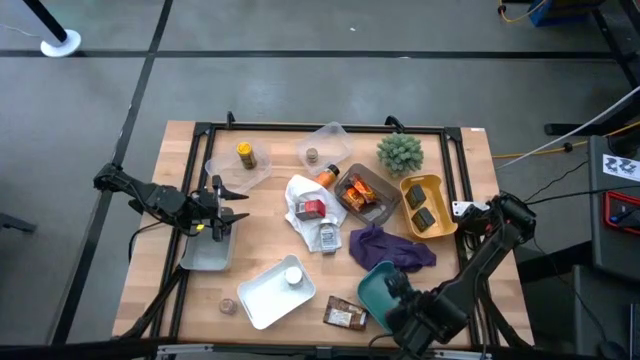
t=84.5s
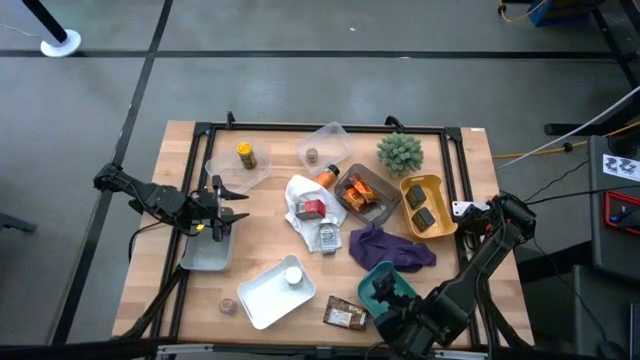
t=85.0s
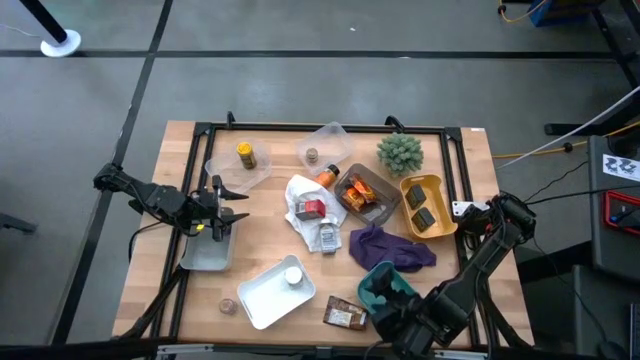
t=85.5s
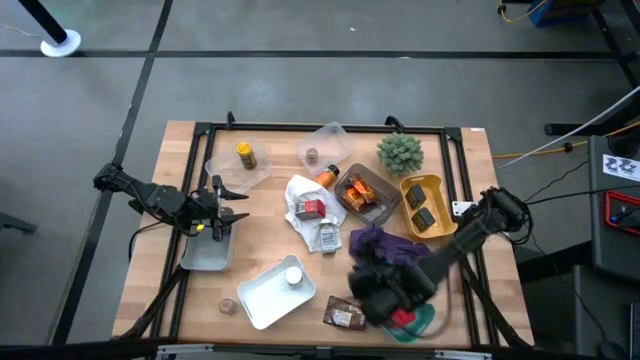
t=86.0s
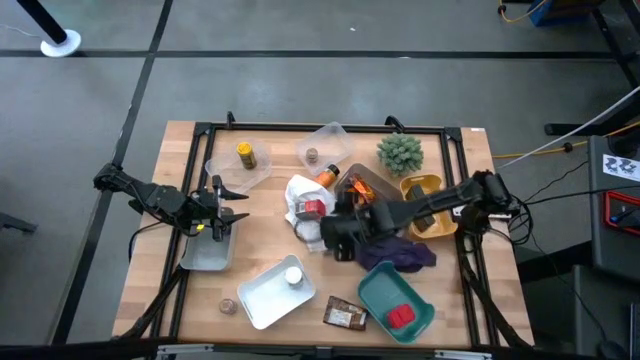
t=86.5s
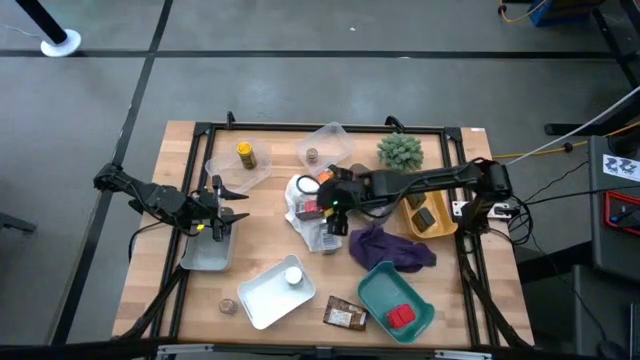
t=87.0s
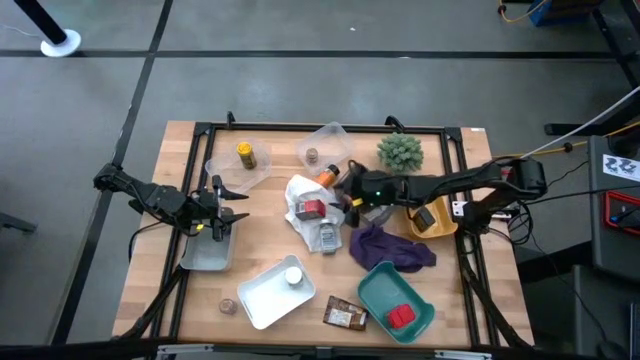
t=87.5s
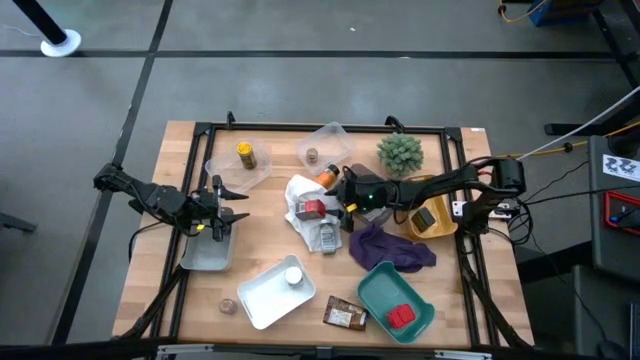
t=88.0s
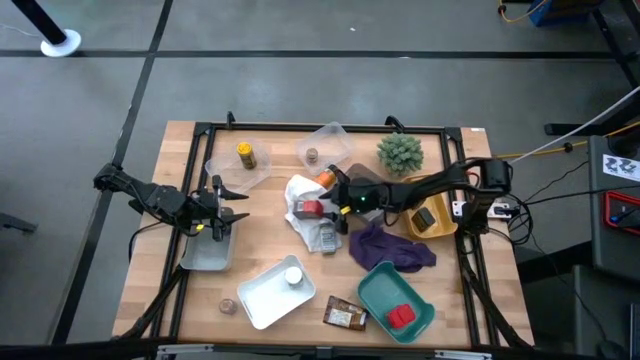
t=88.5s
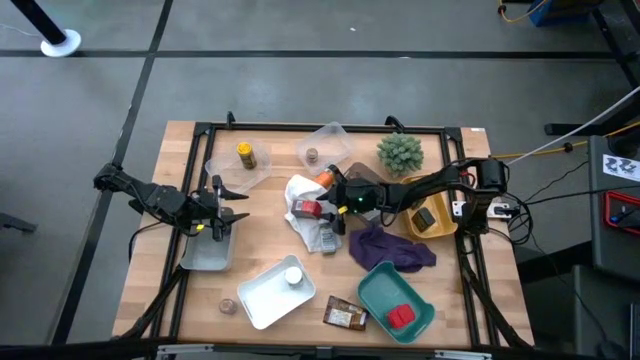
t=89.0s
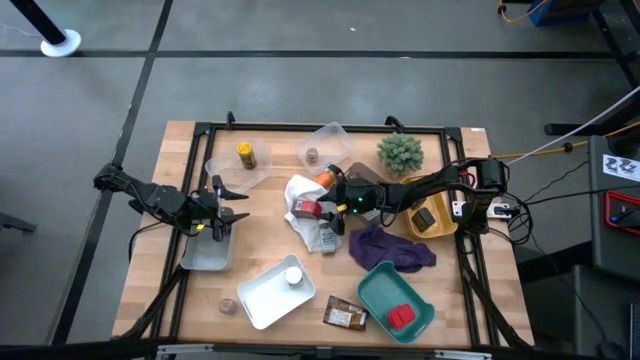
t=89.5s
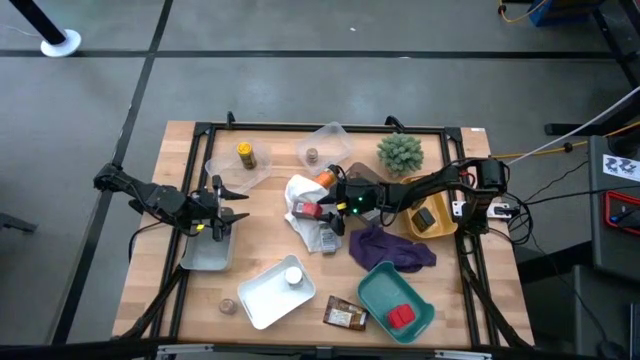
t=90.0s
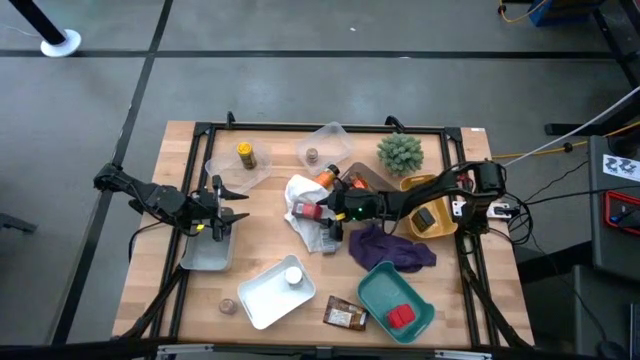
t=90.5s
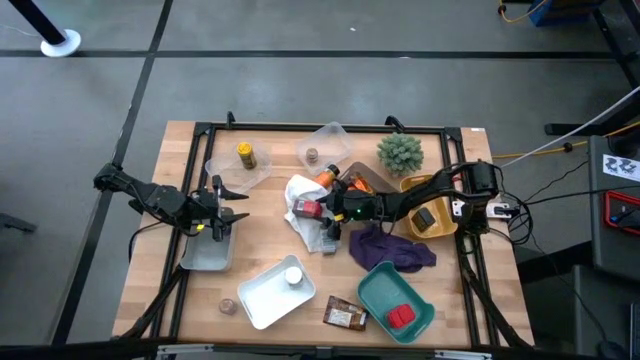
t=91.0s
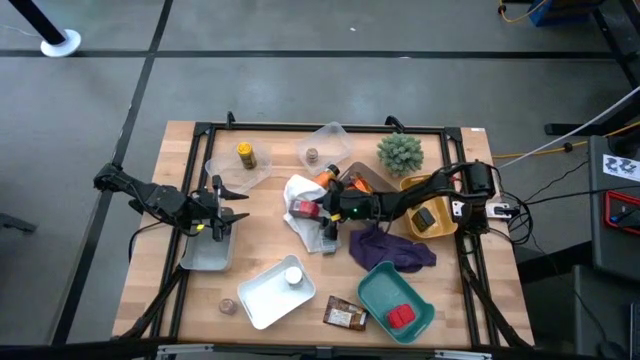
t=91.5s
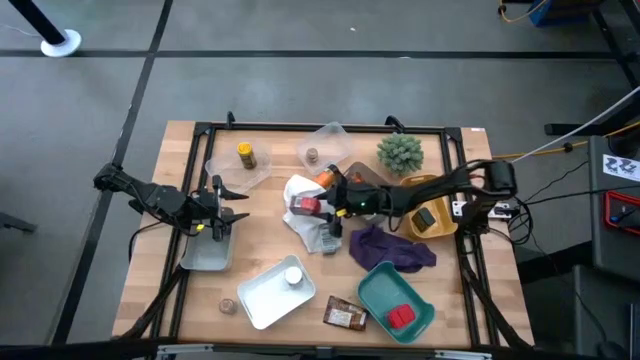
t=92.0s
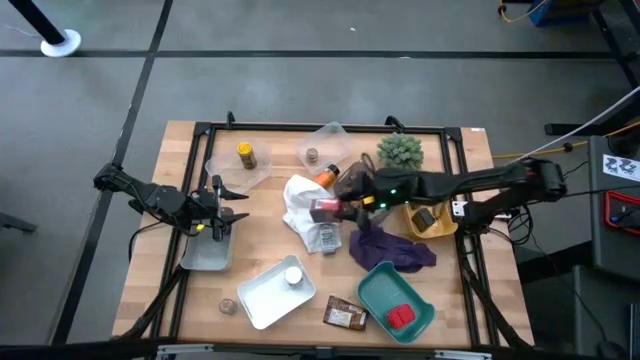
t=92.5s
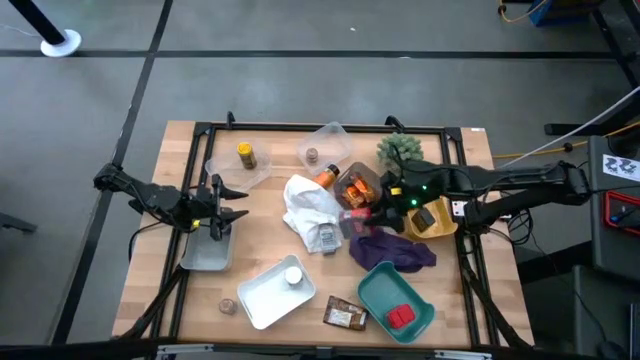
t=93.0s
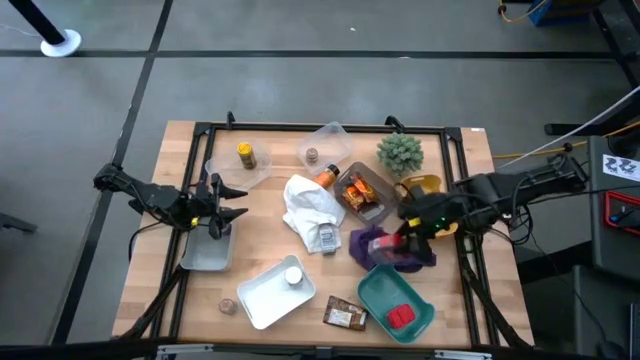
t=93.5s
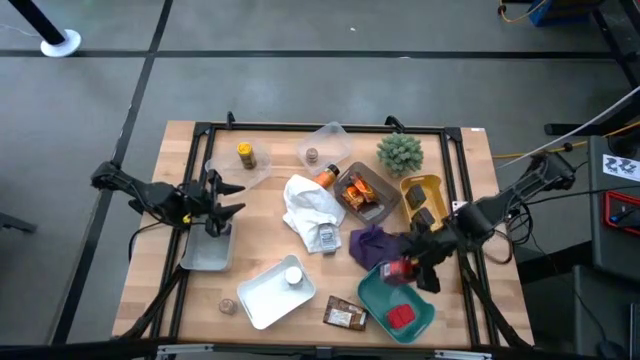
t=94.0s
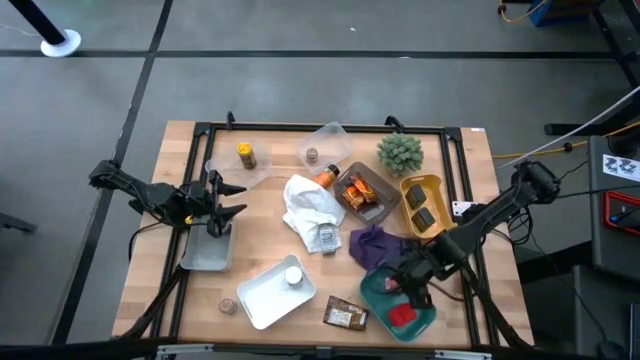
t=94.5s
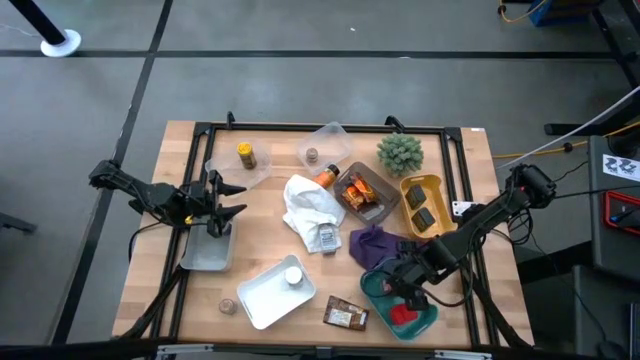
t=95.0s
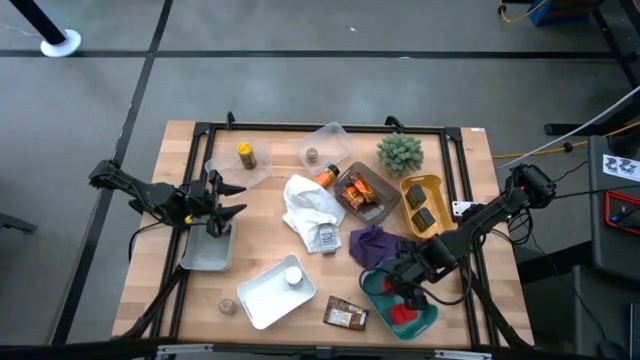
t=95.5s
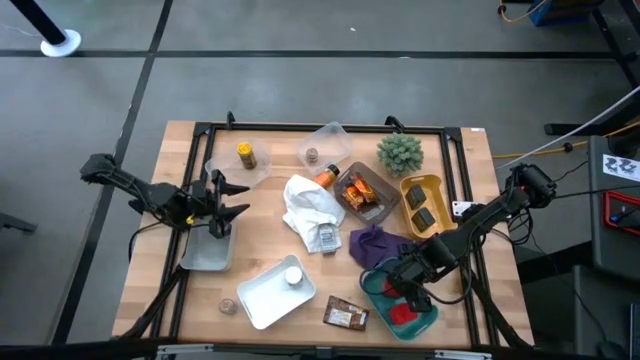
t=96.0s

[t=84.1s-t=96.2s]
Task: Sort spices by type
Put the red spice can into the green bin

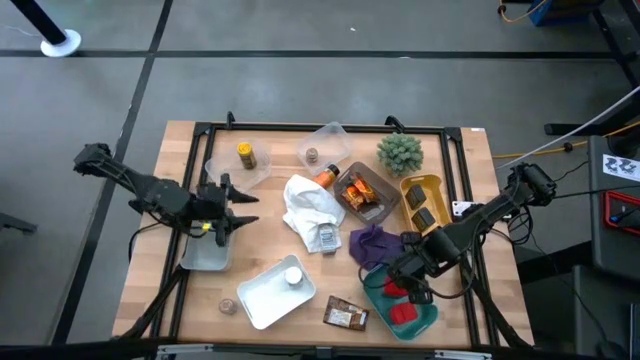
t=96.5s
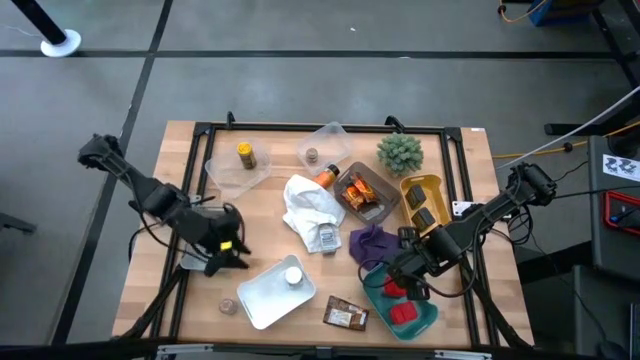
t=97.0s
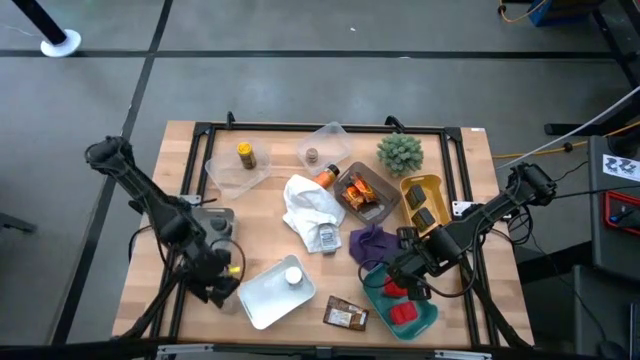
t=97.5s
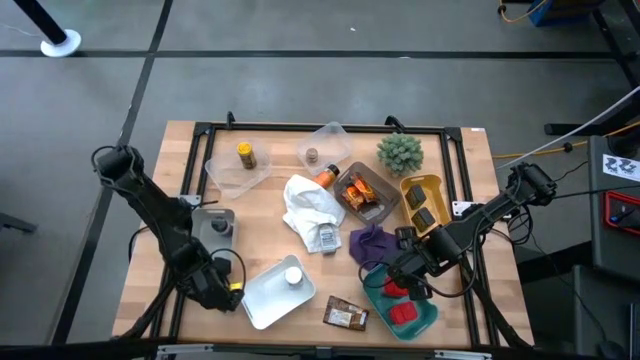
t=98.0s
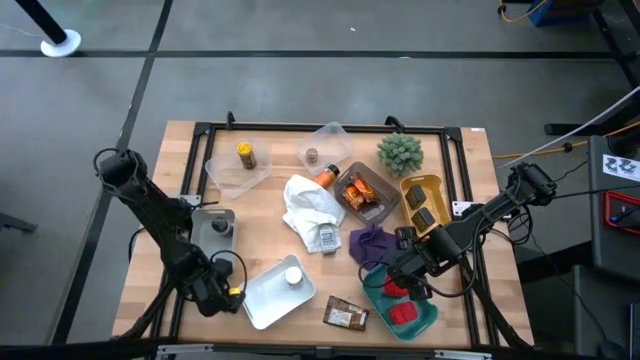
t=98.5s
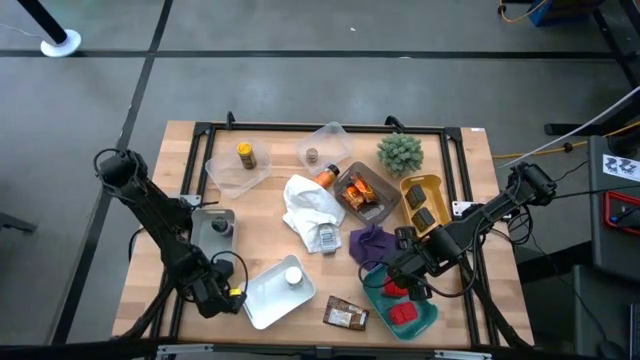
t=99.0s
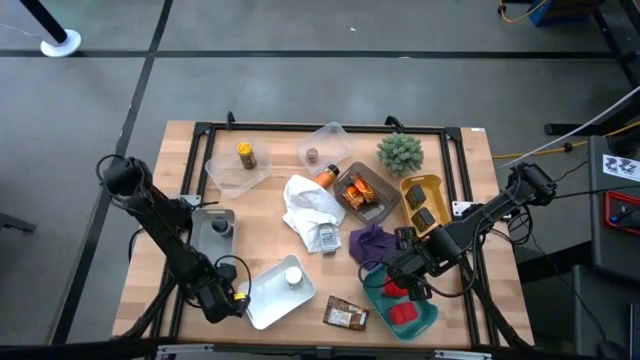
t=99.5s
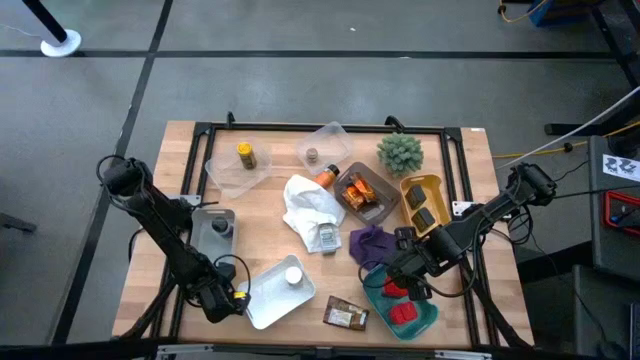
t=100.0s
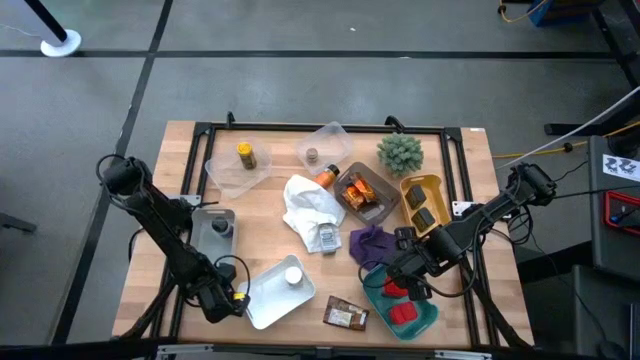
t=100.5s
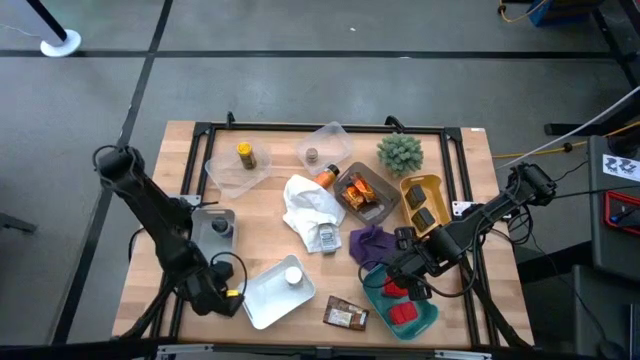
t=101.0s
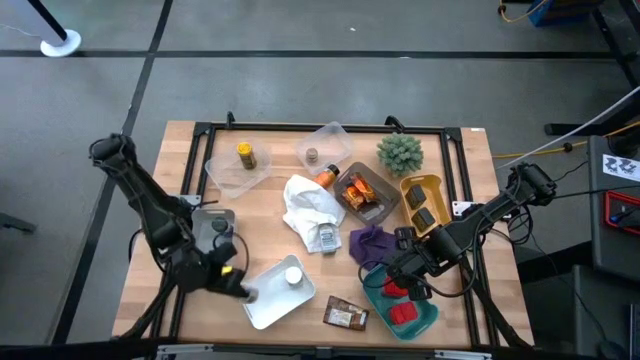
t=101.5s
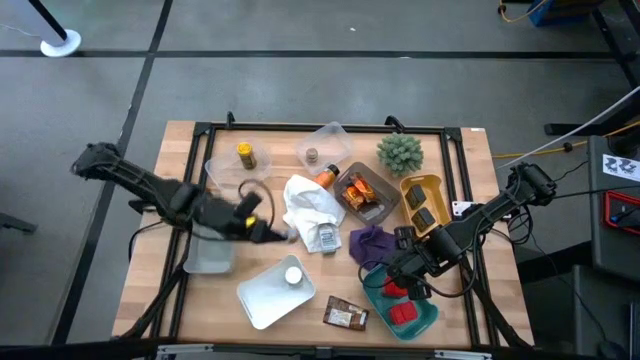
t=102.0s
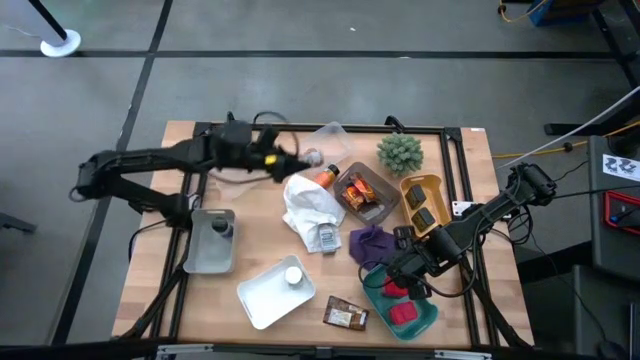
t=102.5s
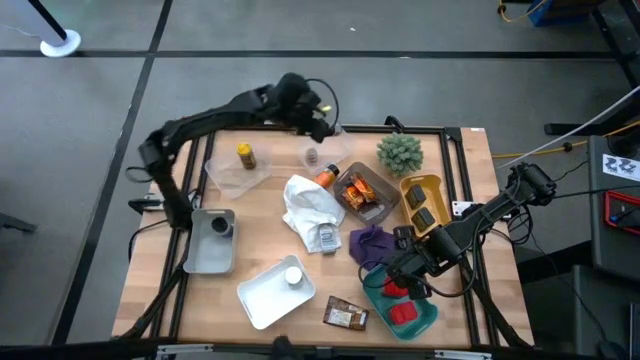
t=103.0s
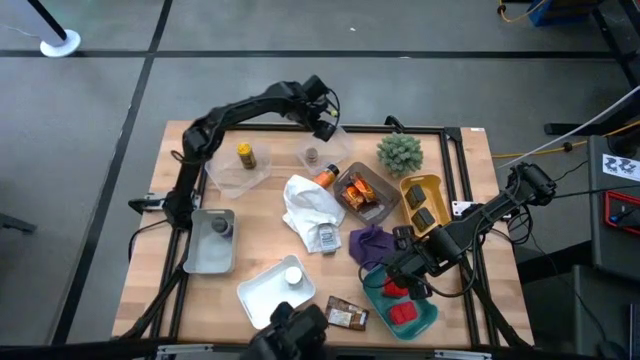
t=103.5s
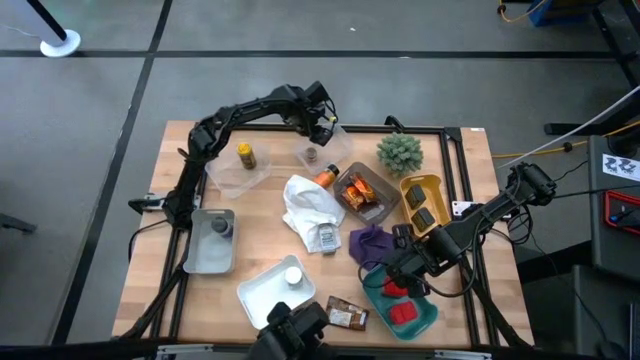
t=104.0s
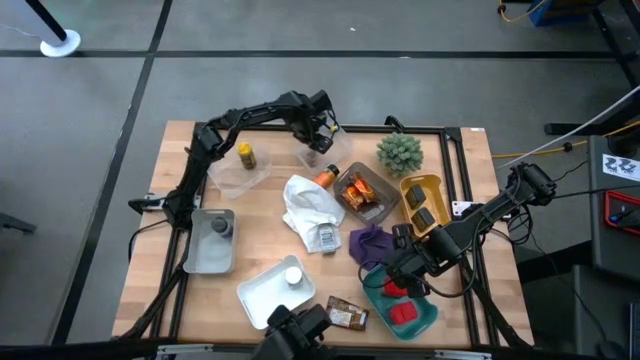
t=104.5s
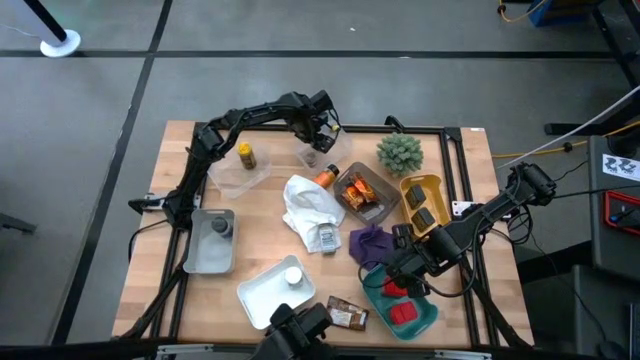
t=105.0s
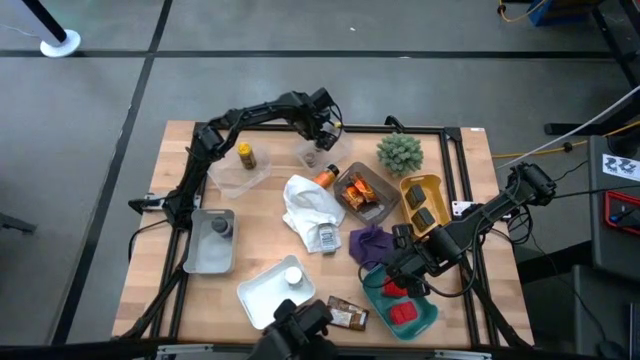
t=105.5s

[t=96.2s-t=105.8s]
Put the brown spice bottle into the right transparent bin
